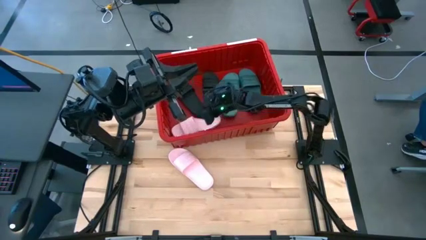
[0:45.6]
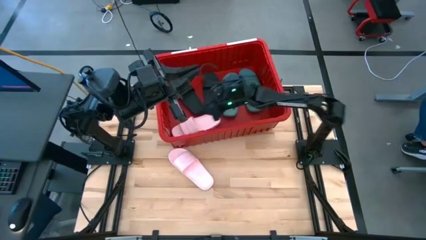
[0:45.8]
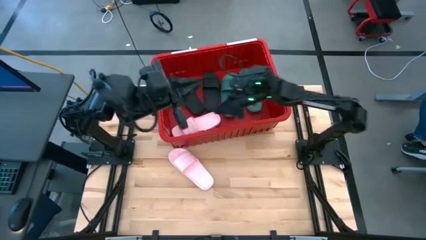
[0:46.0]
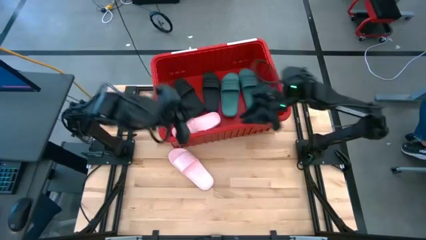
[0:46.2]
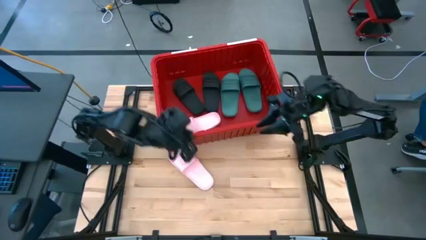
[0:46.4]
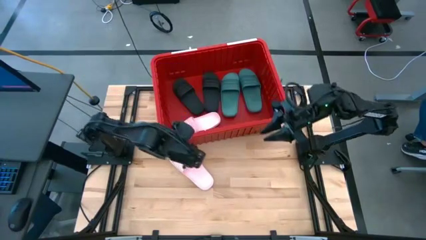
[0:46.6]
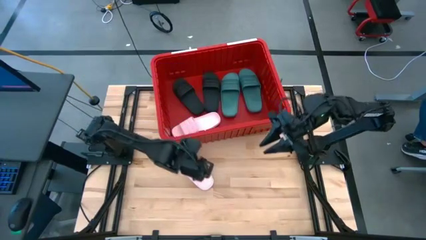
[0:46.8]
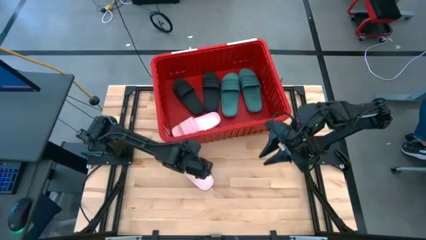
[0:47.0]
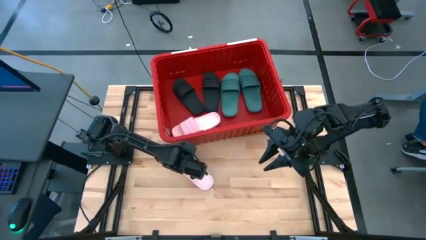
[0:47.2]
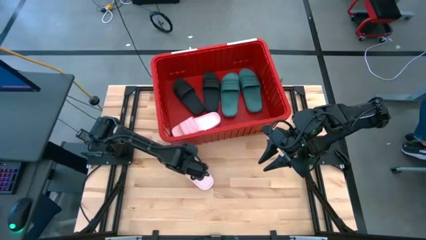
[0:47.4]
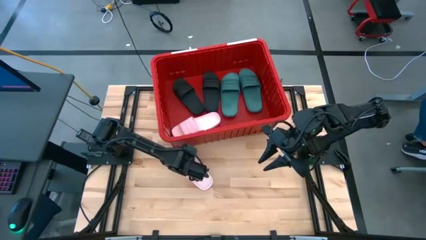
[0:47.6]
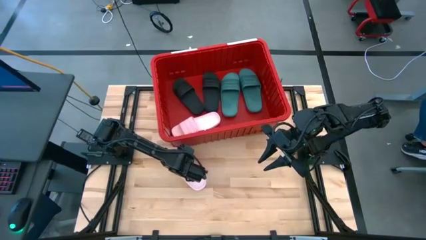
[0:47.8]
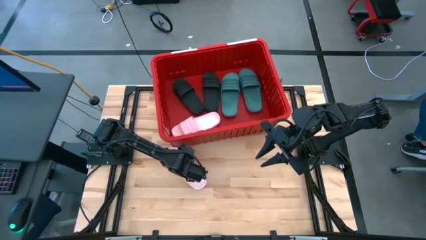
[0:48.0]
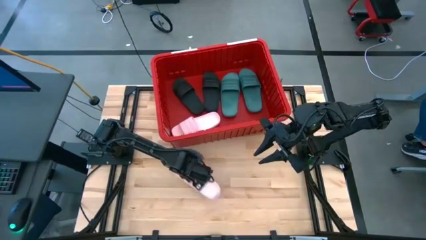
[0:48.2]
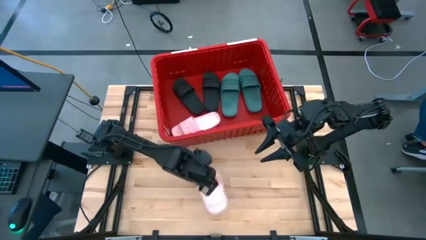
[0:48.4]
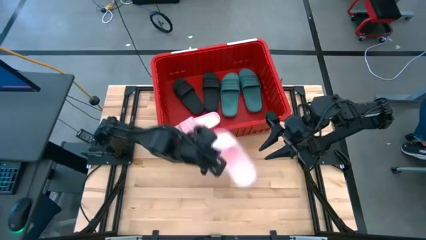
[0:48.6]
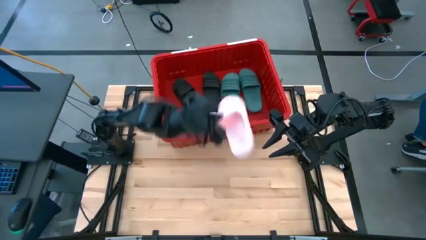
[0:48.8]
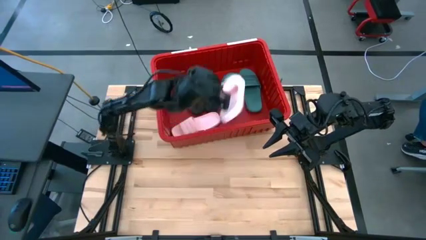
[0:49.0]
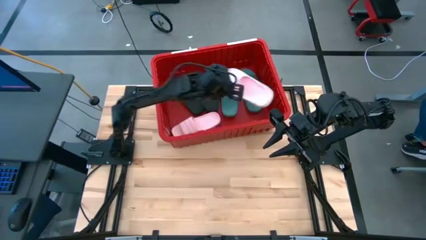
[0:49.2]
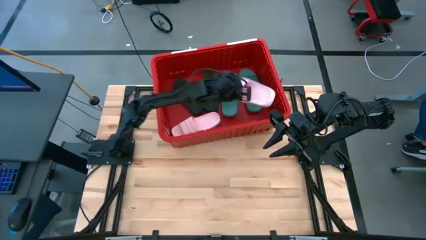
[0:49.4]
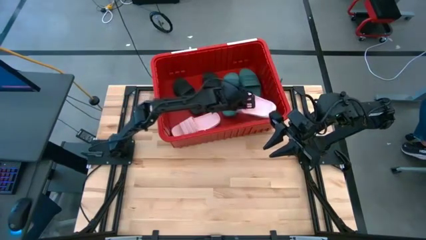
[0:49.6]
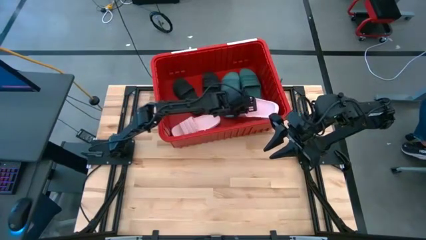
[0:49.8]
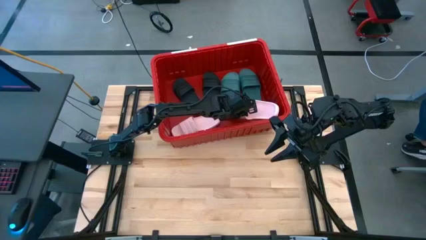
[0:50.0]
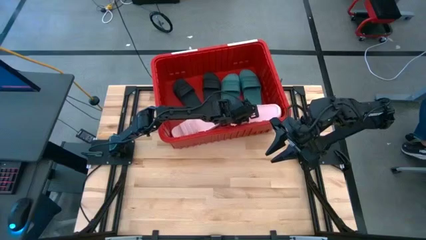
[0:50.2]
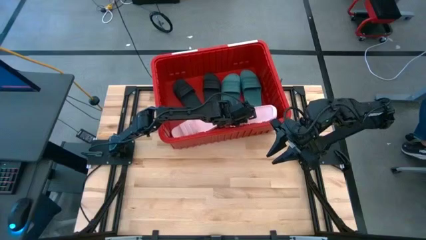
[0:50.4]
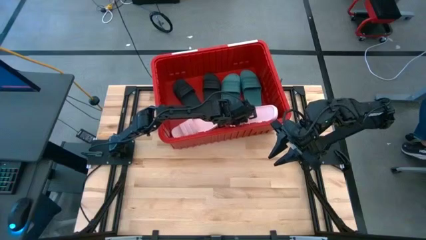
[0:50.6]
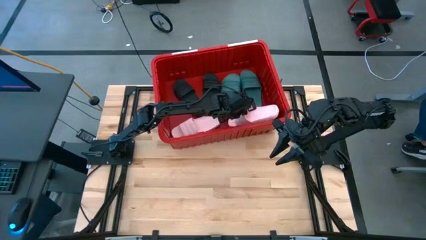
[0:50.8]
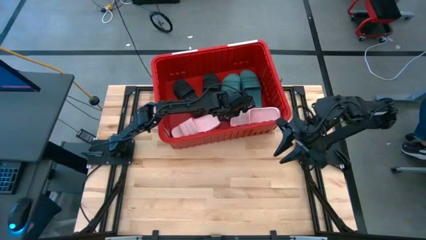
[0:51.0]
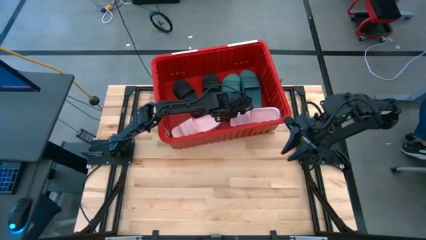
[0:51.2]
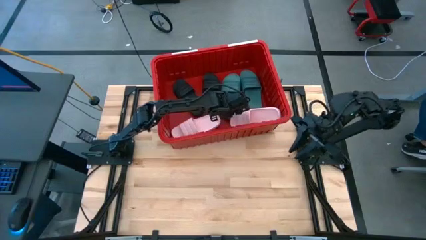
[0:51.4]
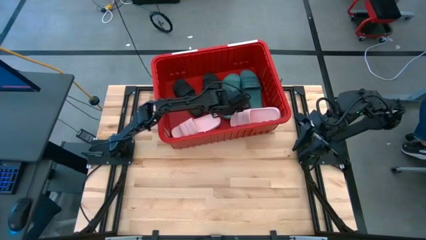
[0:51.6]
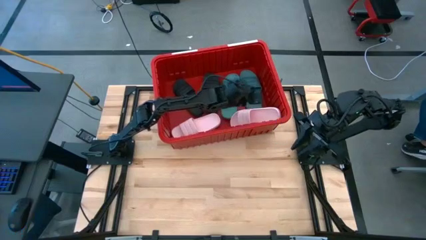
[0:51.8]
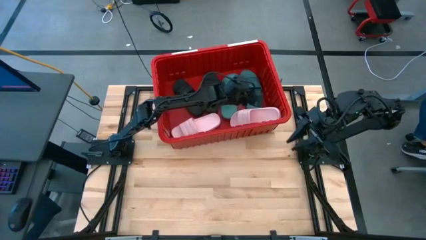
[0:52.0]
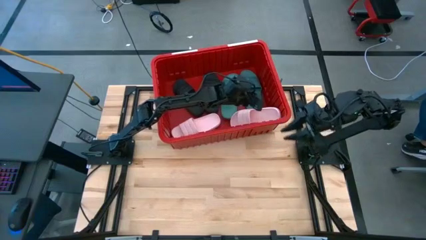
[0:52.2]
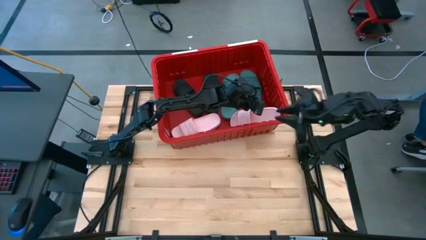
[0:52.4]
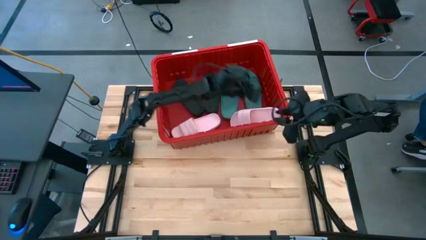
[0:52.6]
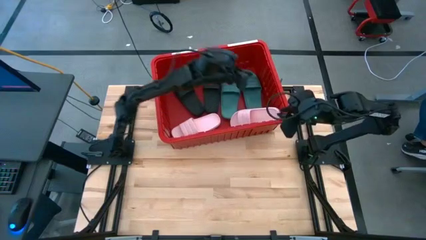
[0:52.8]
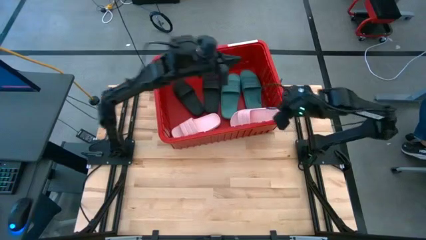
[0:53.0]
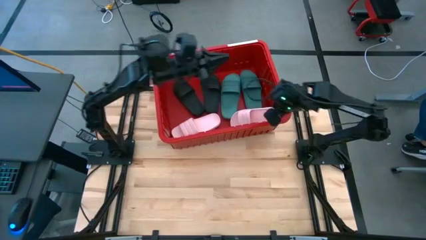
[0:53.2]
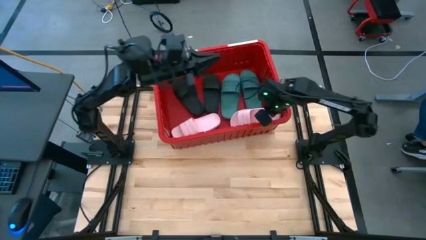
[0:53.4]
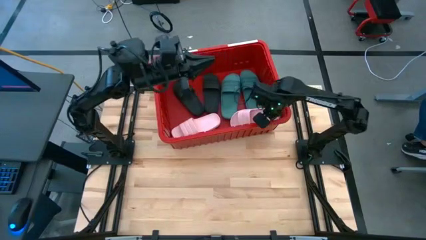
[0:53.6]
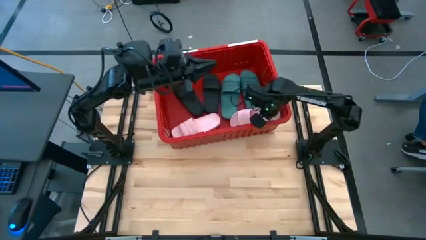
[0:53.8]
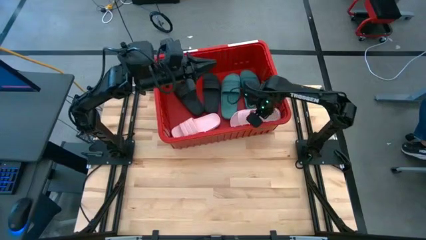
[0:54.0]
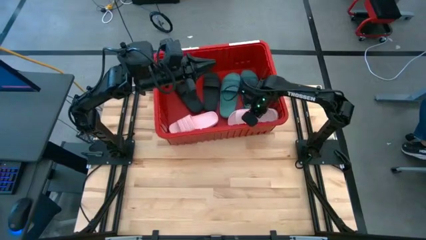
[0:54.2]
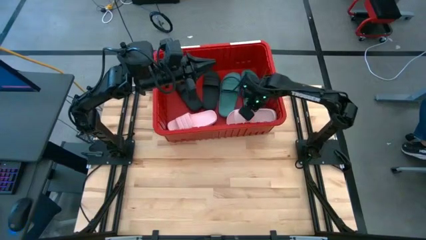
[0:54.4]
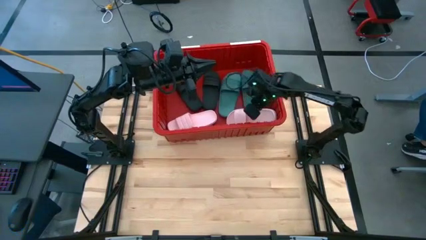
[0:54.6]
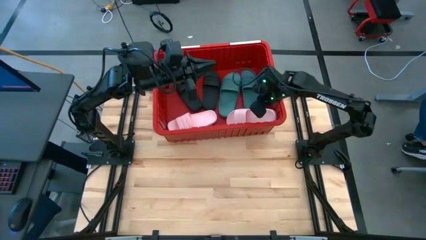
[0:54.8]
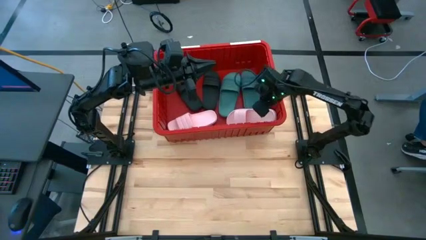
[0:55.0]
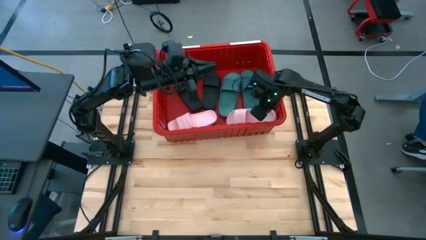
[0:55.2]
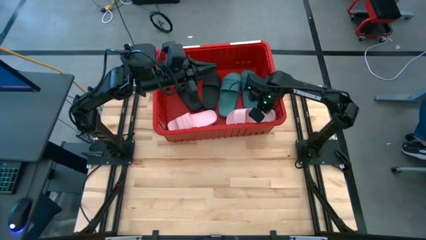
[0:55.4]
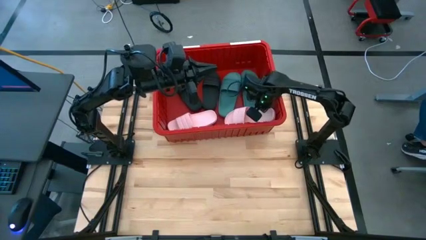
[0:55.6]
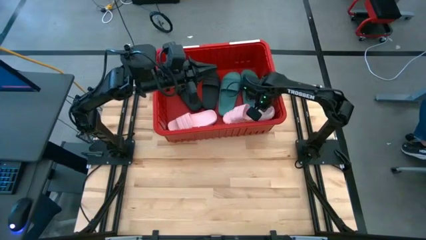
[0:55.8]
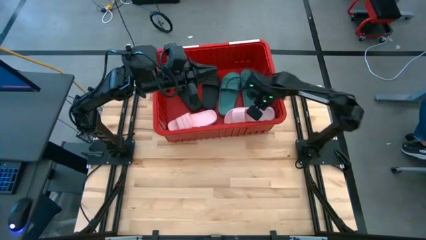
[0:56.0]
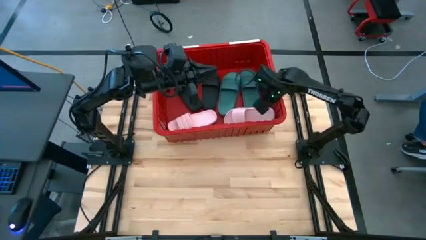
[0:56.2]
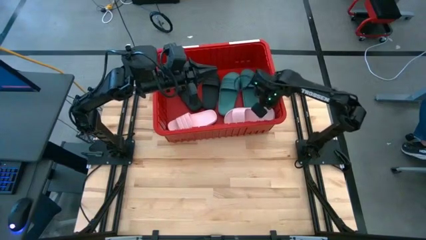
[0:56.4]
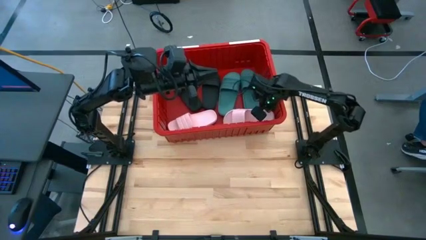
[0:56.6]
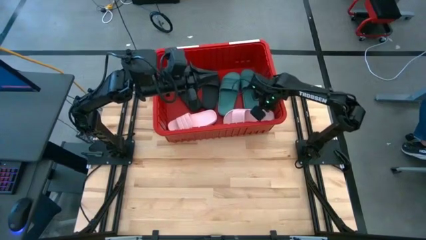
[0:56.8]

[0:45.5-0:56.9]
Task: Pick and place slides into bin
Put the pink slide into the red bin

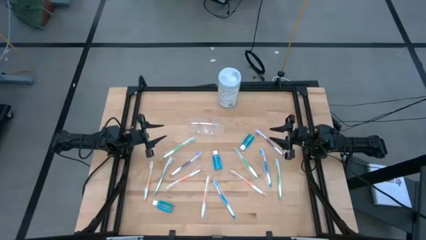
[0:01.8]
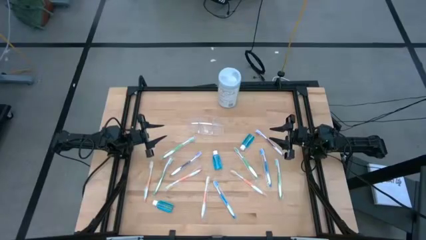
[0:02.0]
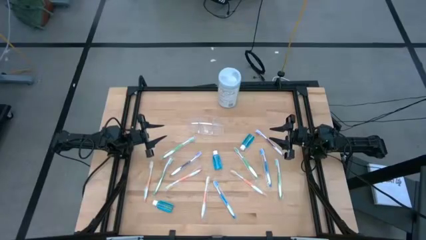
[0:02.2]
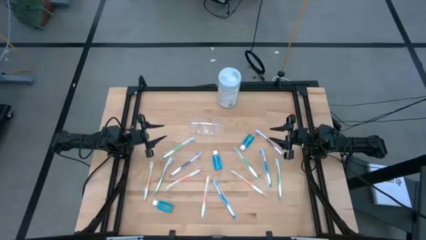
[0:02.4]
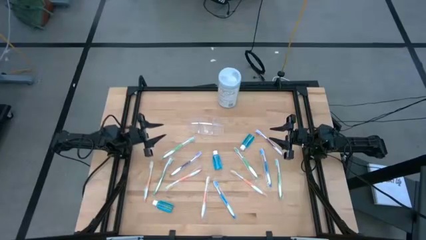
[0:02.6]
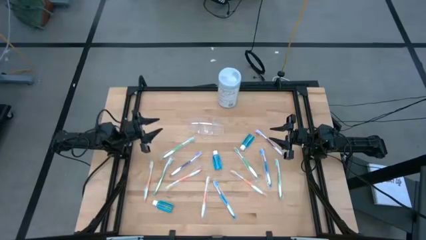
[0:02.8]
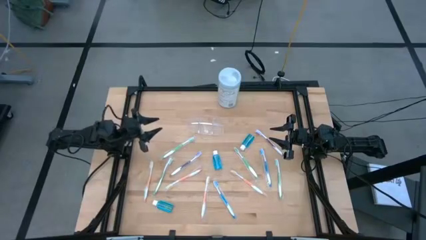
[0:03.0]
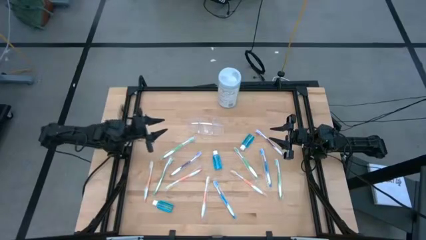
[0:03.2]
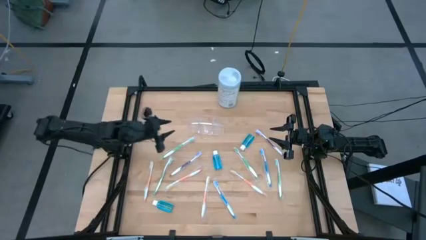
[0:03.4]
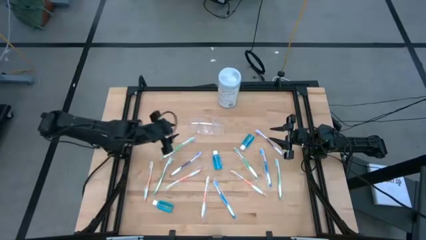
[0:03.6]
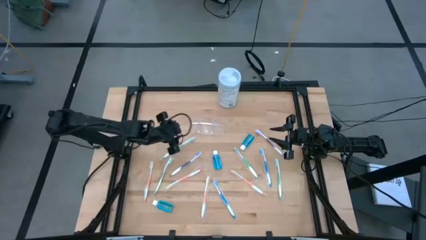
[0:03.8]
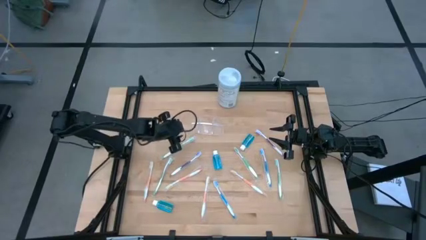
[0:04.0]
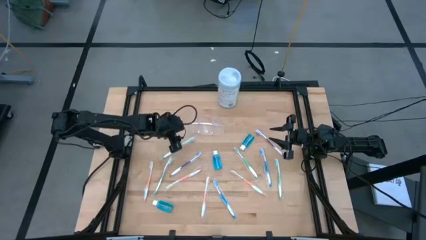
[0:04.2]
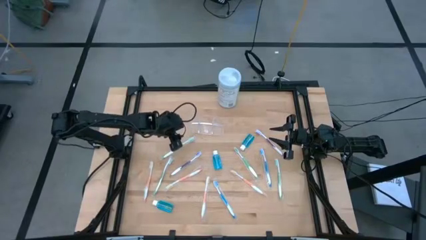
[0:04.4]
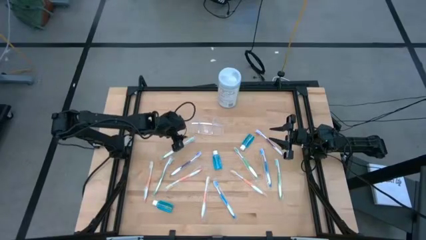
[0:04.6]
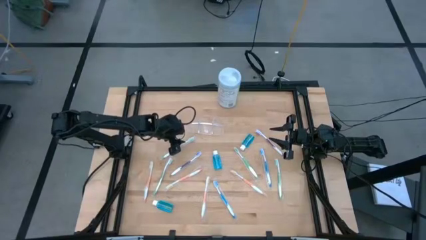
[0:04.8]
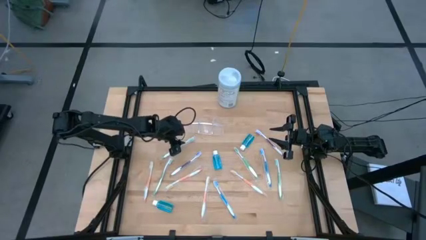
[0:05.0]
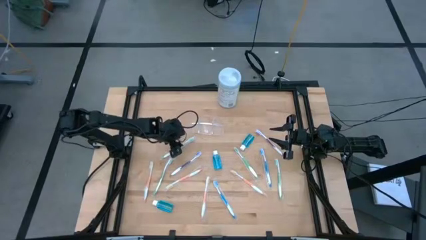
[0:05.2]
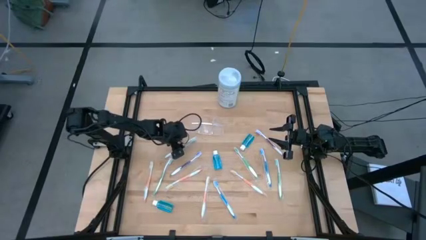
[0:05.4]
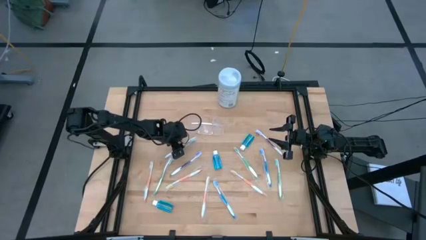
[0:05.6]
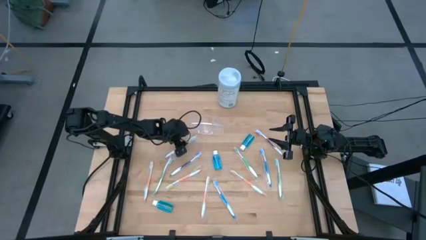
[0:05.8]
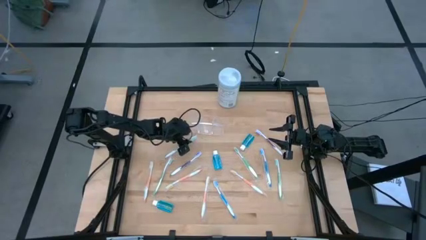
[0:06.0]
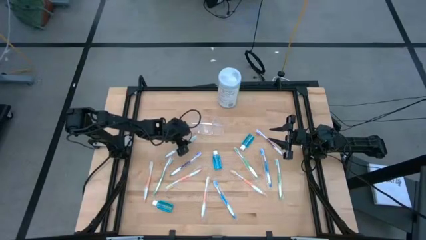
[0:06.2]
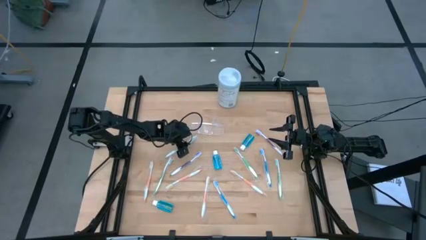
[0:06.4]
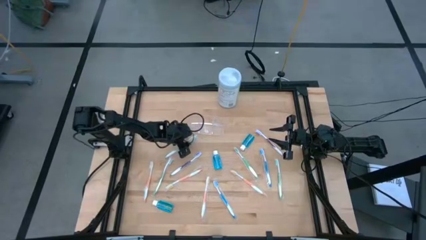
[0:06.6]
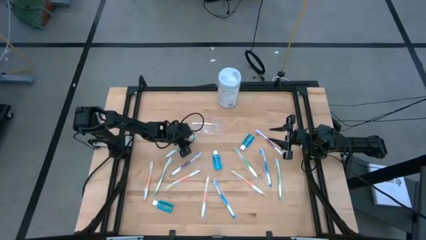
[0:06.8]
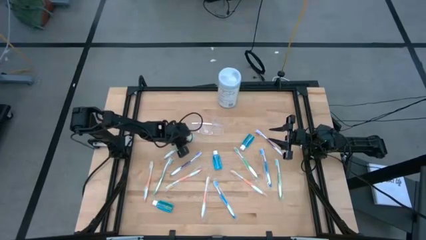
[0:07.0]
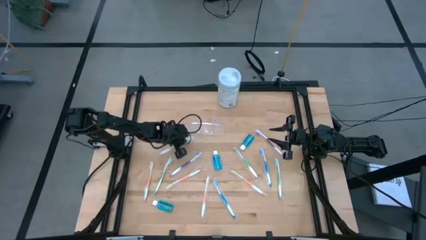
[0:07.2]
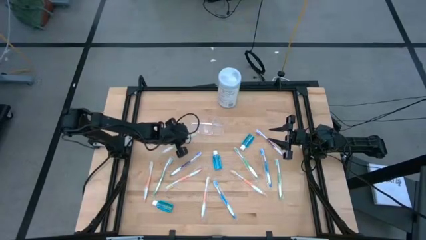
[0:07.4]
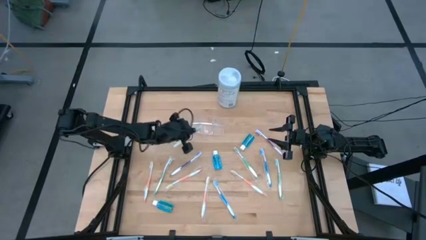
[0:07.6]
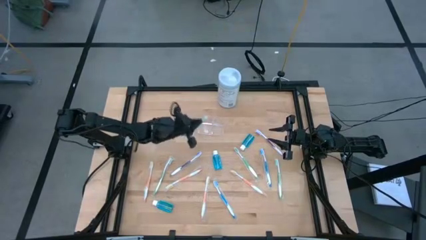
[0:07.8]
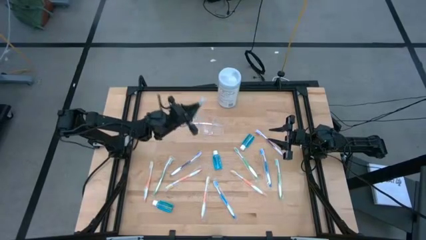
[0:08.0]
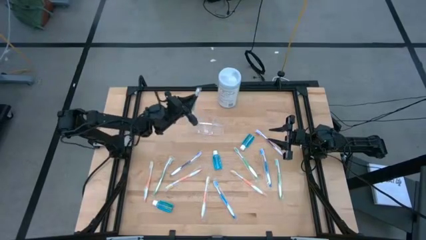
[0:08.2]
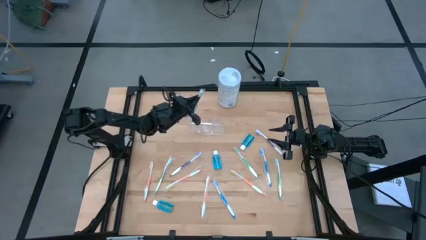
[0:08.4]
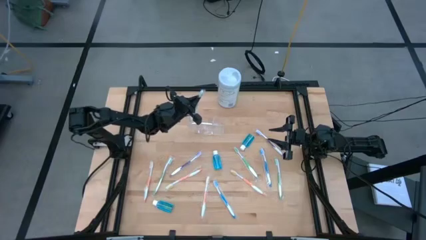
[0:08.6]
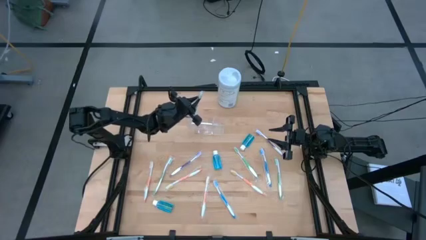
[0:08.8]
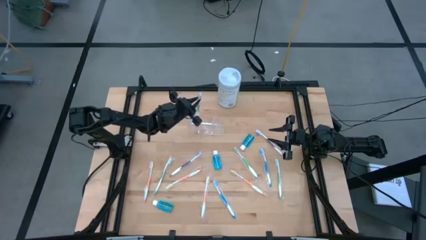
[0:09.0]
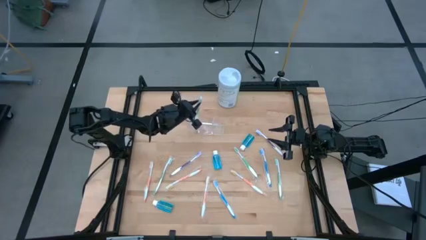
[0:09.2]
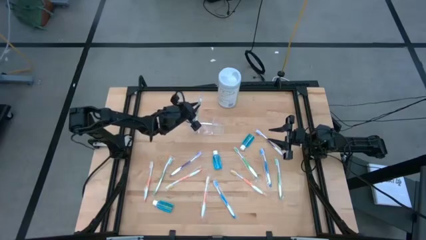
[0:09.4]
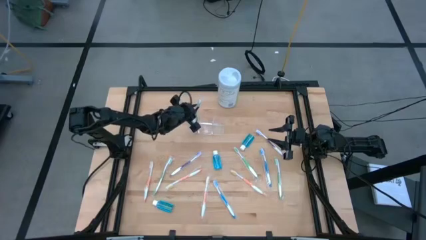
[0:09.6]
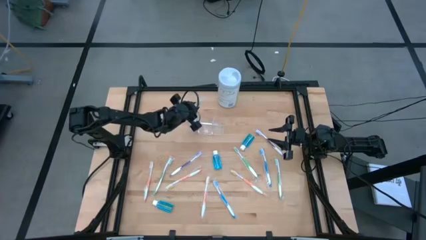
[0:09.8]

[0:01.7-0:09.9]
Task: Pick & Place toothbrushing station
Put the green toothbrush into the transparent organizer
